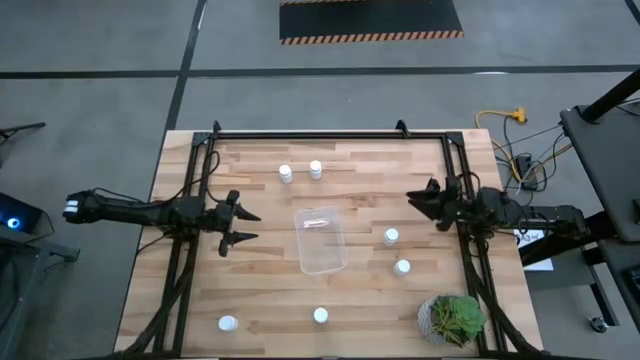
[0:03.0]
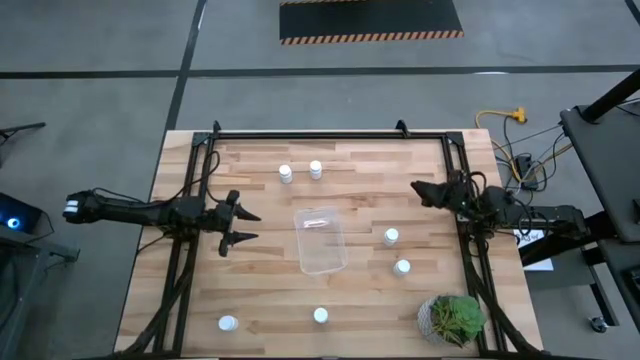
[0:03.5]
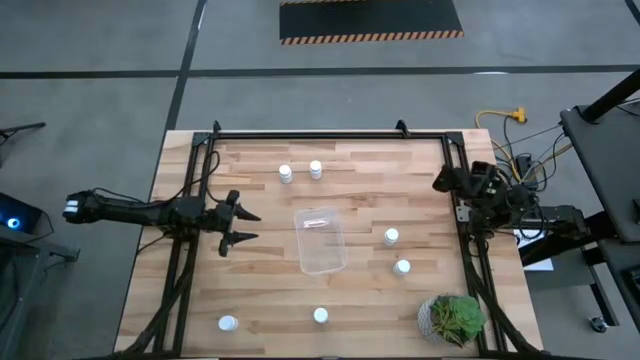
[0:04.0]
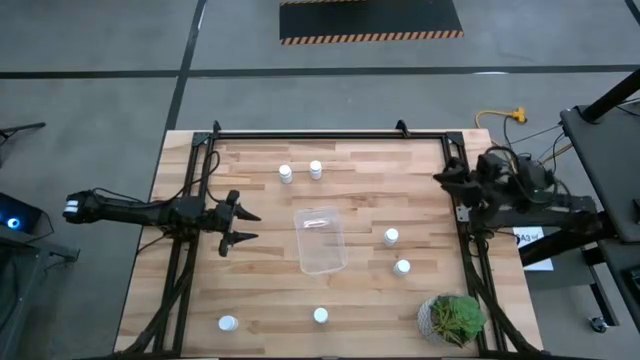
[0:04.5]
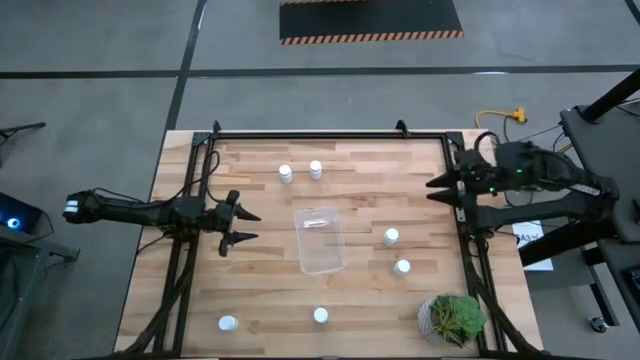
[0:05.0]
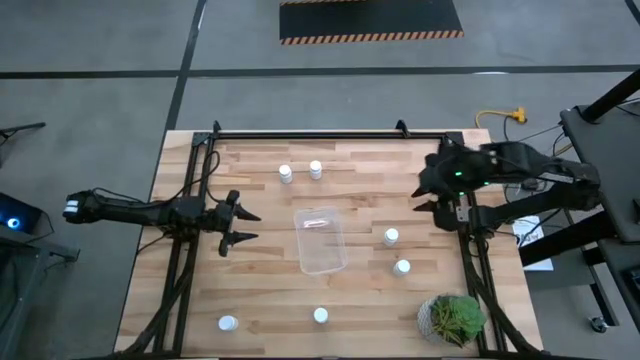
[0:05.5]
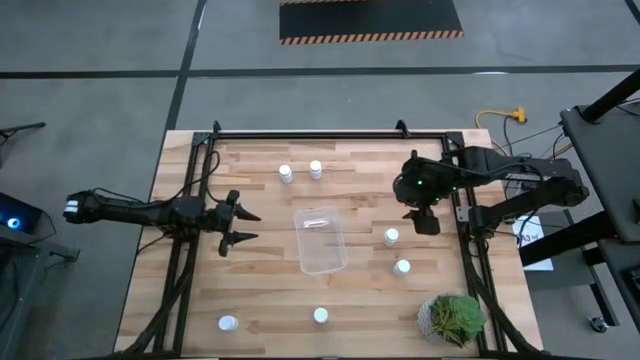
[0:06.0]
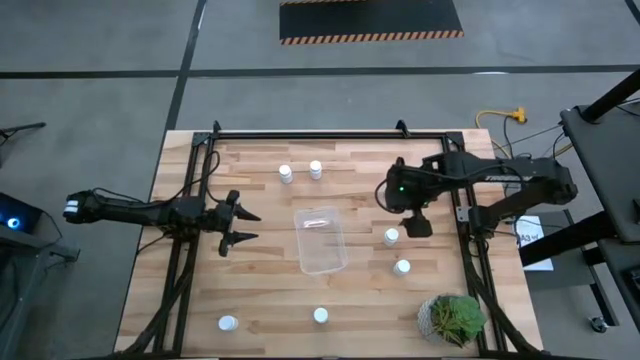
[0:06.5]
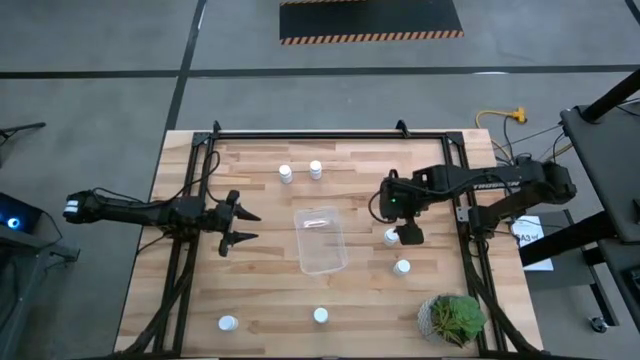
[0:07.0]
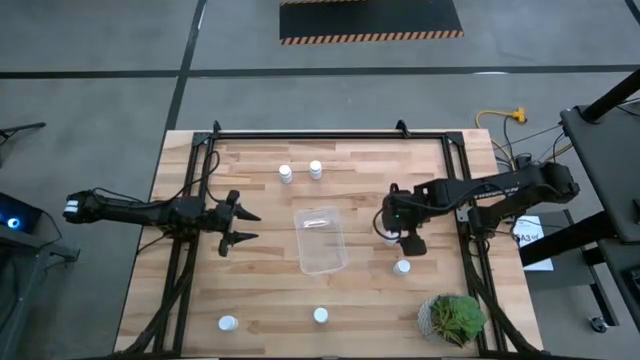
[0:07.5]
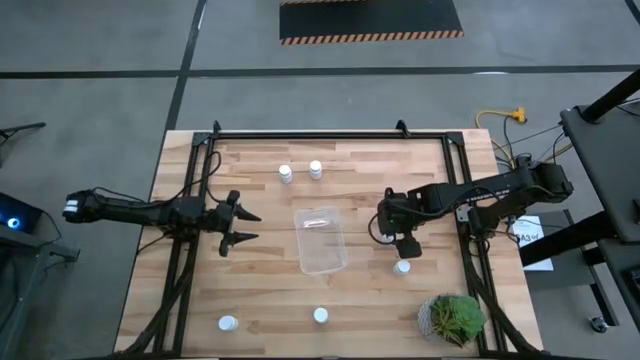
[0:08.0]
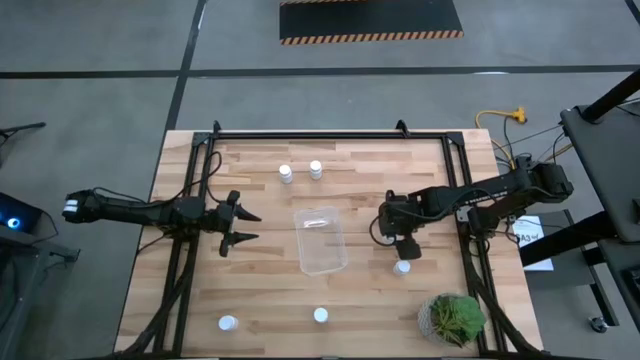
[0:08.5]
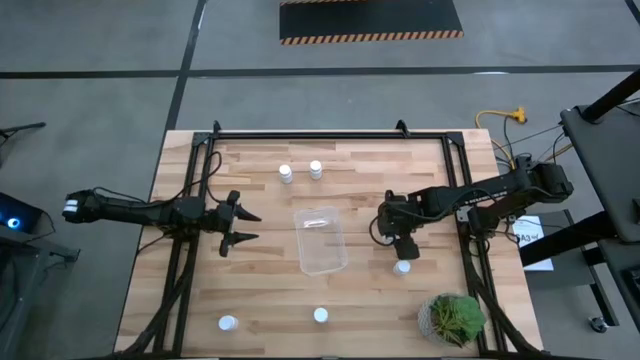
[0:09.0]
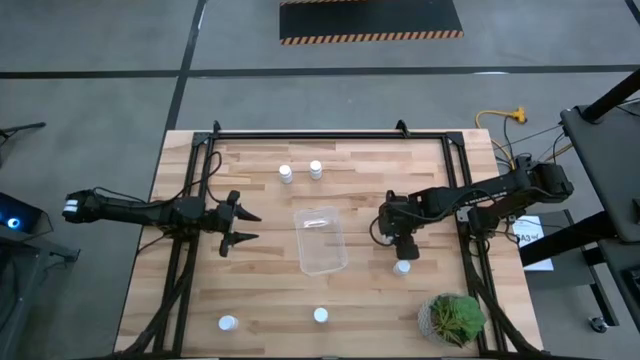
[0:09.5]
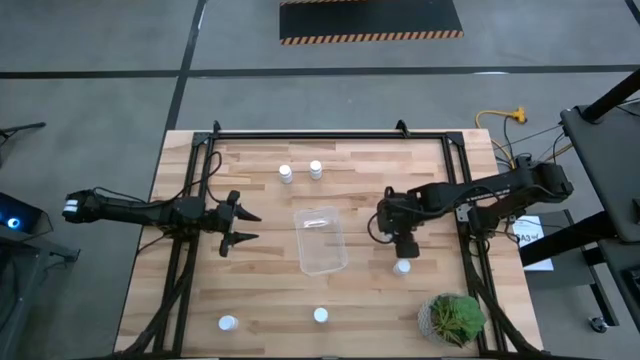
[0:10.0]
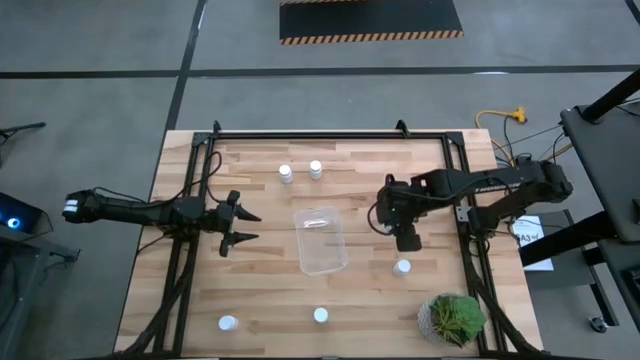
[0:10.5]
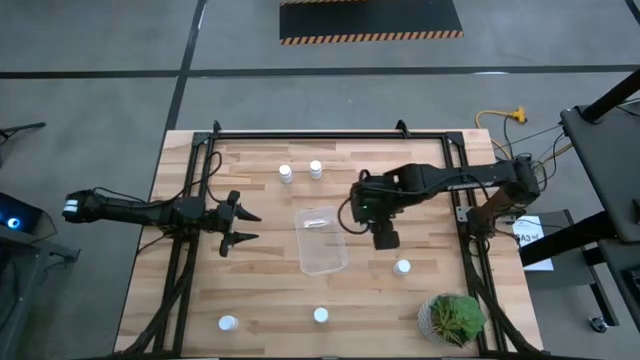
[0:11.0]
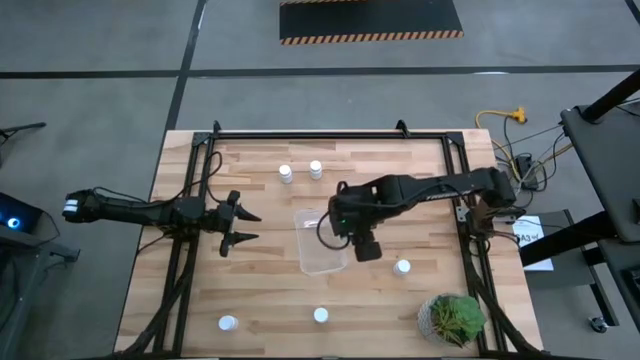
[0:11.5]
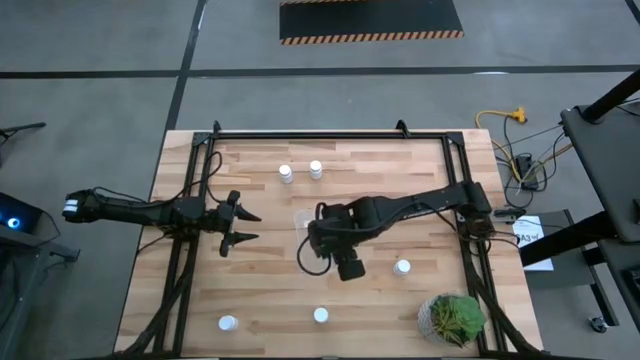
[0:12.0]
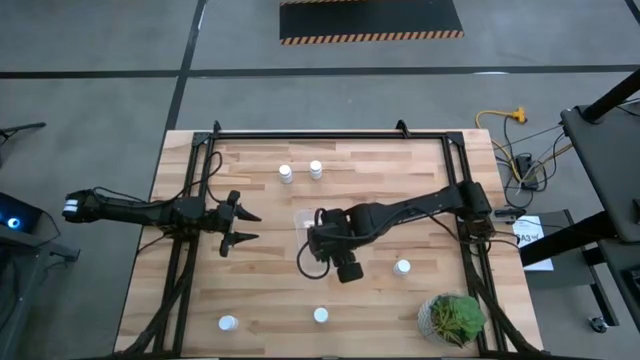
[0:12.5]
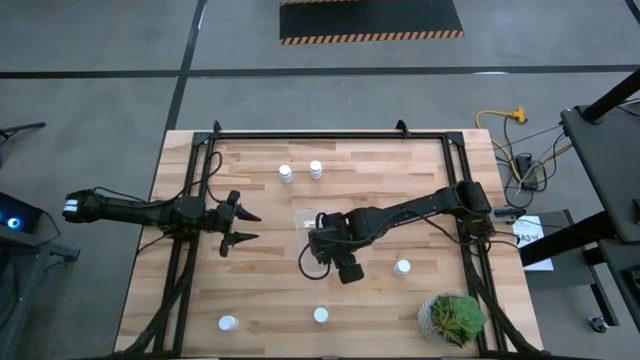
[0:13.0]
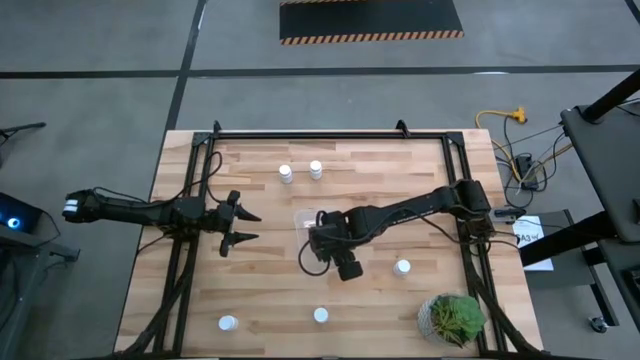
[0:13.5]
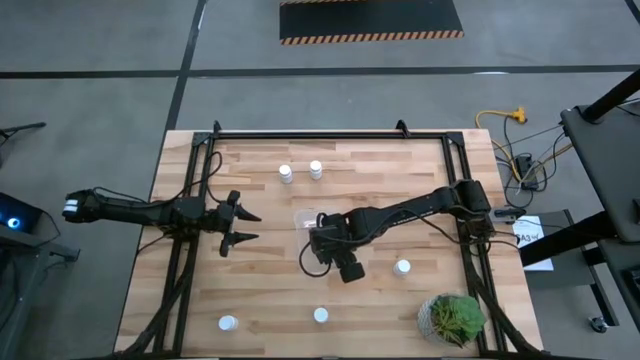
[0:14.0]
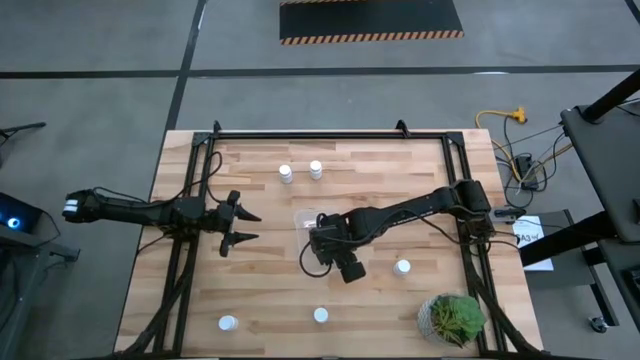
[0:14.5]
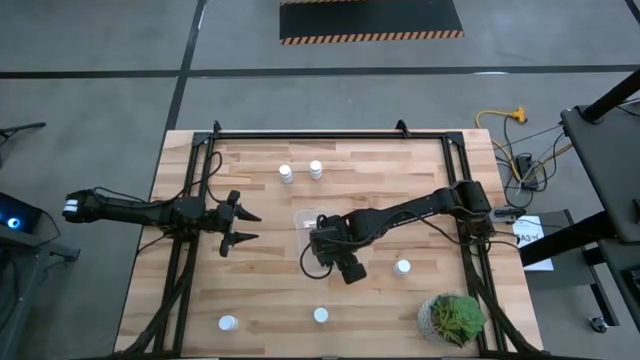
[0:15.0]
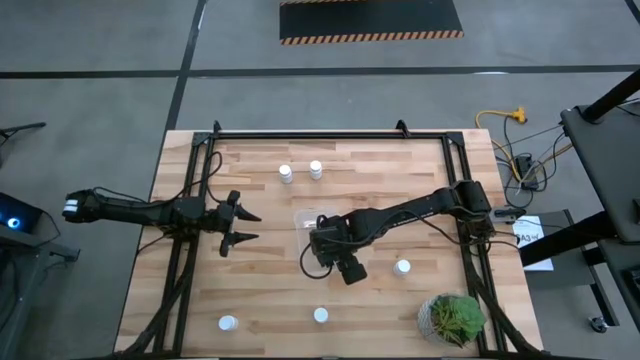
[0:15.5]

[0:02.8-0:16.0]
Task: Pick and place pill bottles into a basket
Put the white pill bottle into the transparent bin

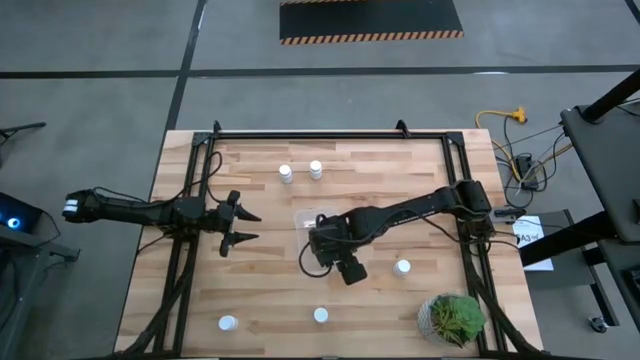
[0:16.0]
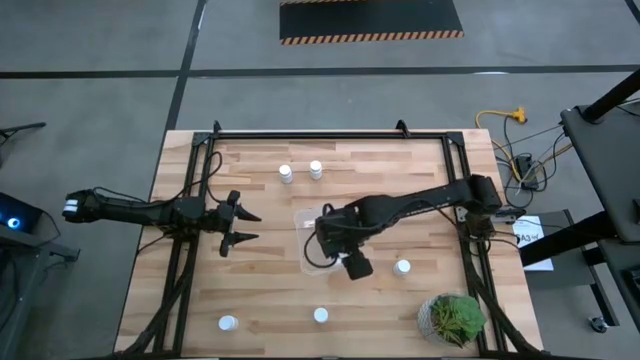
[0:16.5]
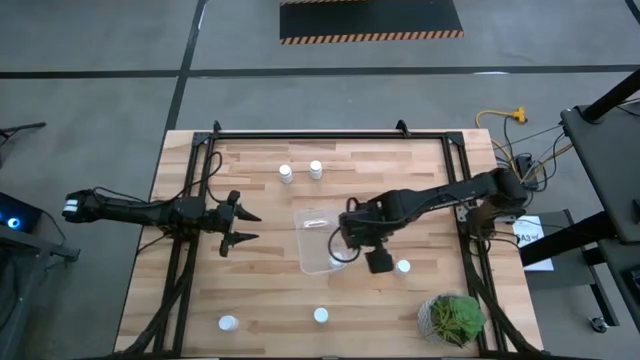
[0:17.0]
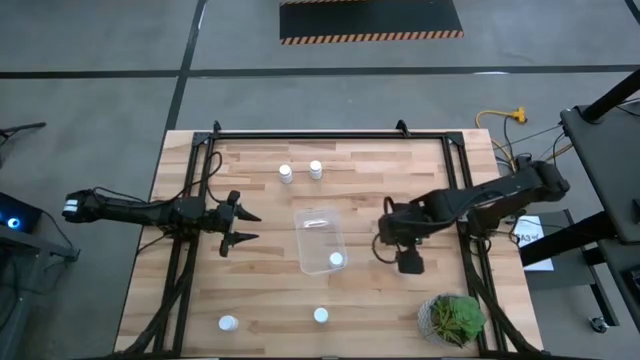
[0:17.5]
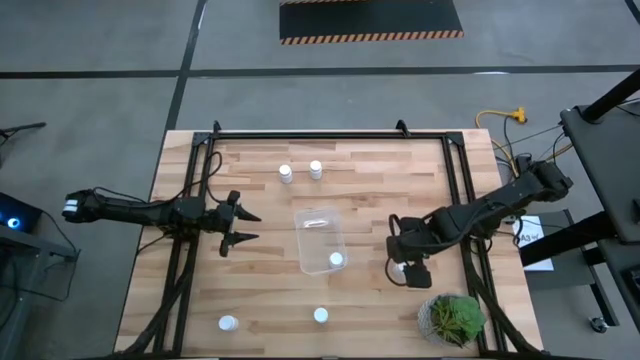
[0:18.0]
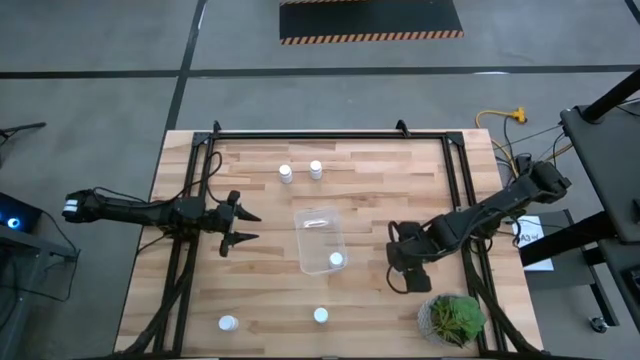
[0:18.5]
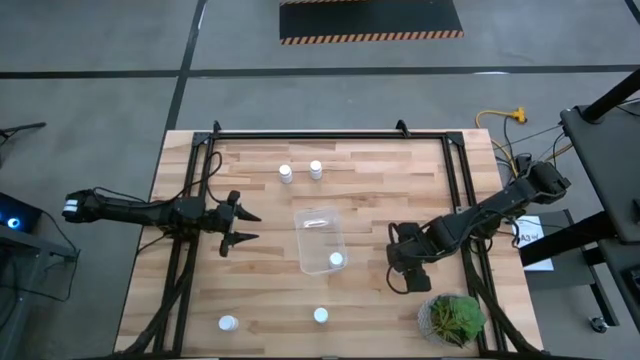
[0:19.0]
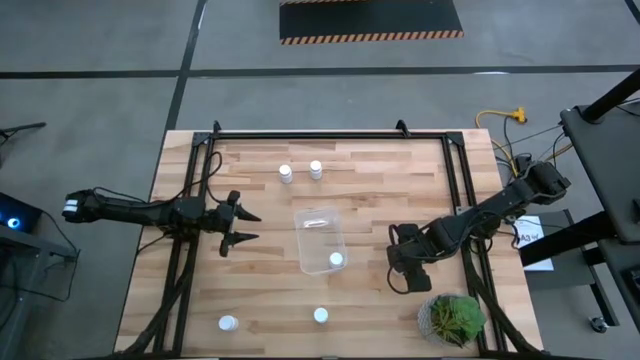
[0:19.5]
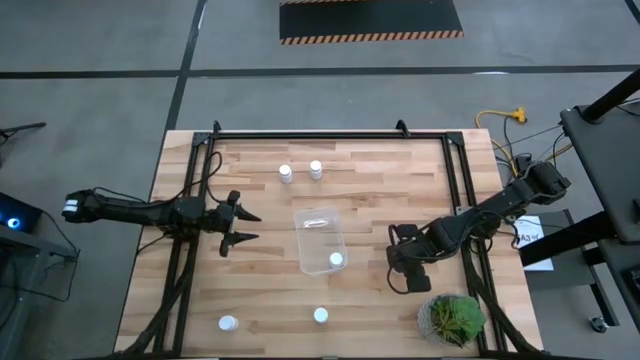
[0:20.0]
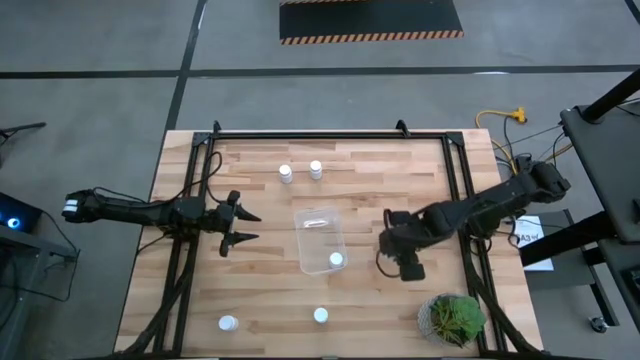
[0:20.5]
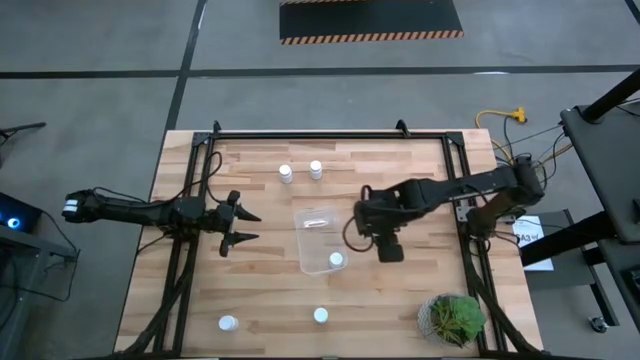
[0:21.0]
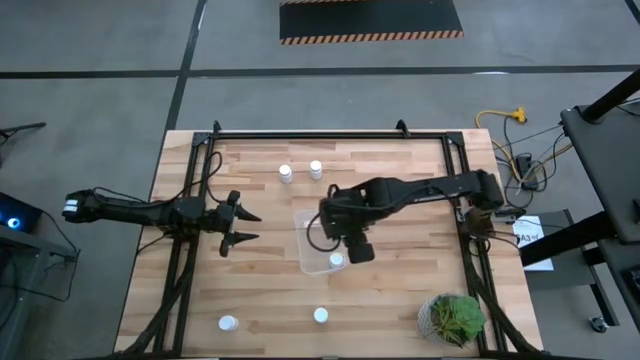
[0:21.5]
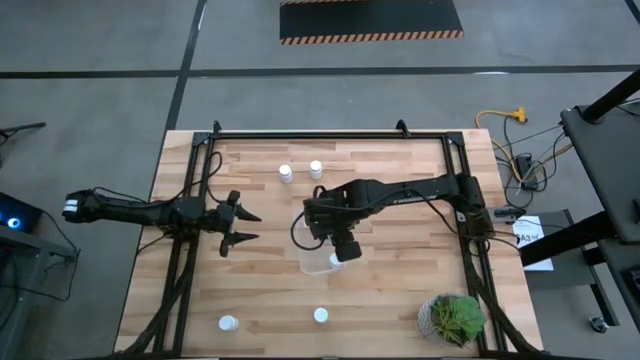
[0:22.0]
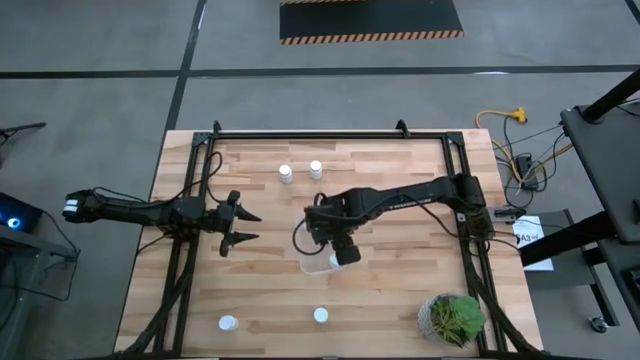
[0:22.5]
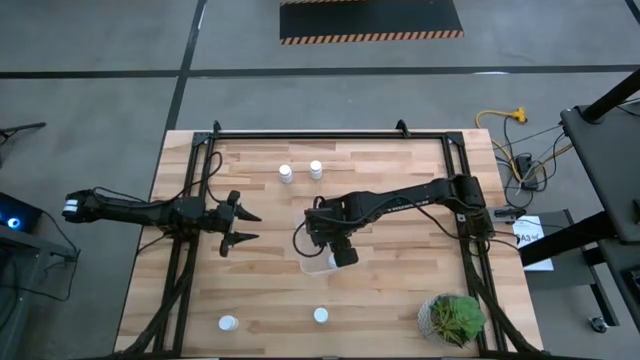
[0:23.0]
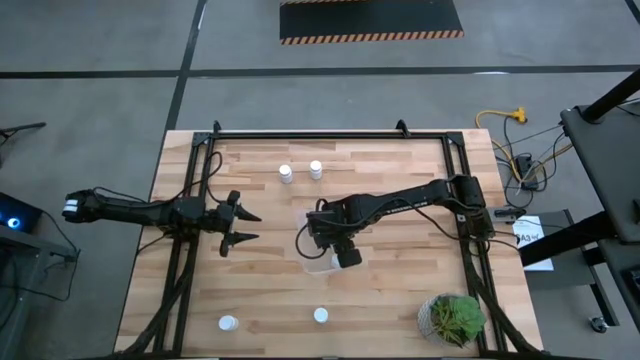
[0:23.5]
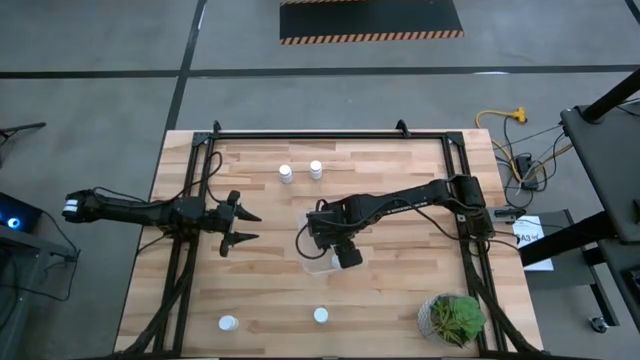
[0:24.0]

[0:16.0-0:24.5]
Put the white pill bottle into the transparent bin
